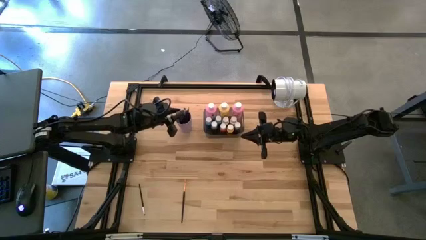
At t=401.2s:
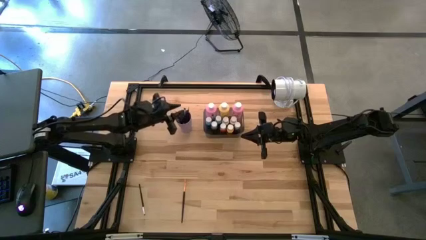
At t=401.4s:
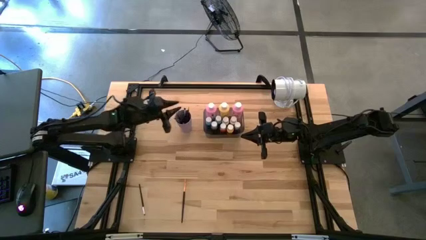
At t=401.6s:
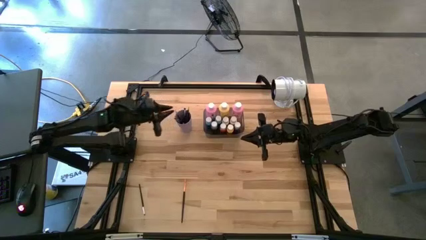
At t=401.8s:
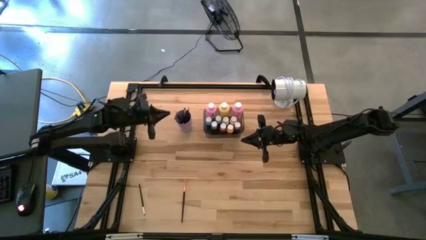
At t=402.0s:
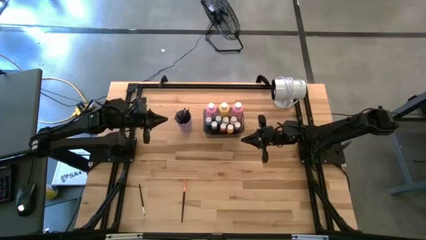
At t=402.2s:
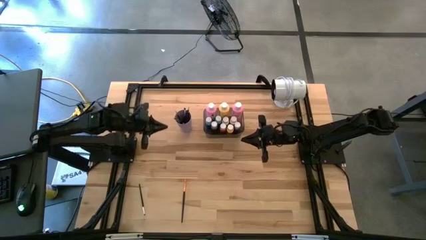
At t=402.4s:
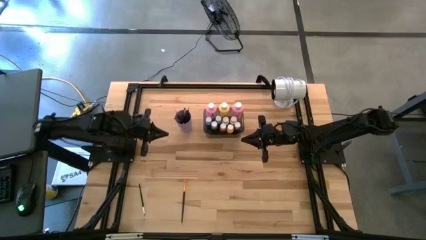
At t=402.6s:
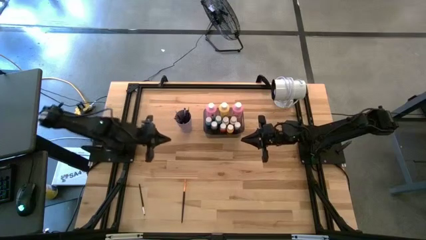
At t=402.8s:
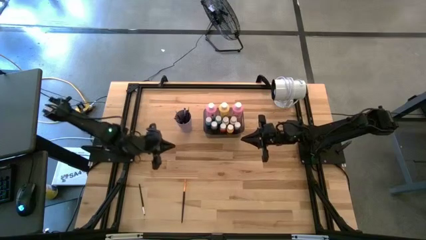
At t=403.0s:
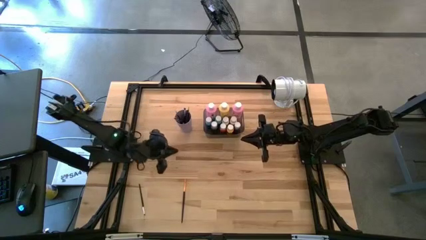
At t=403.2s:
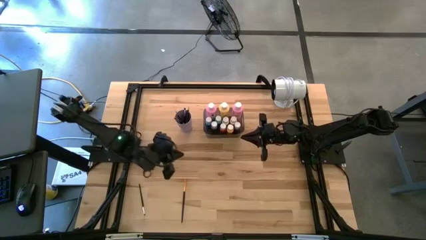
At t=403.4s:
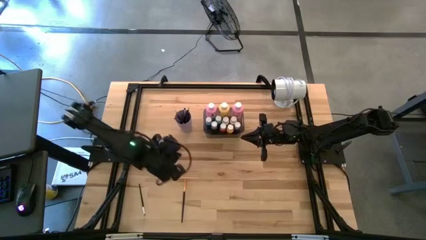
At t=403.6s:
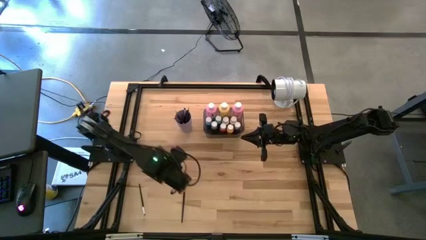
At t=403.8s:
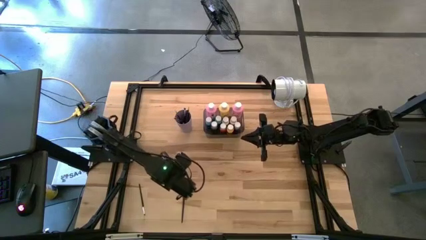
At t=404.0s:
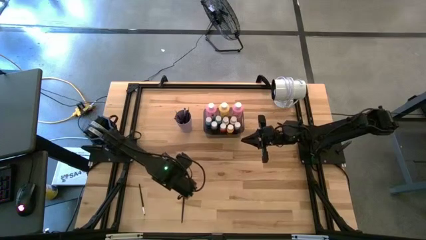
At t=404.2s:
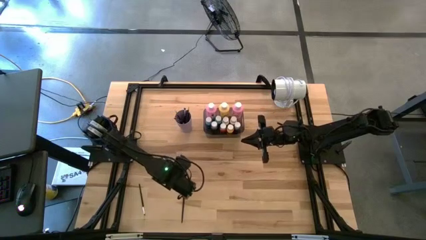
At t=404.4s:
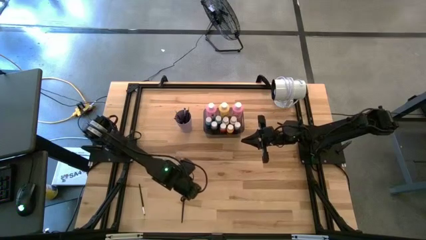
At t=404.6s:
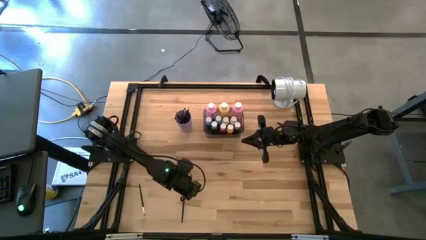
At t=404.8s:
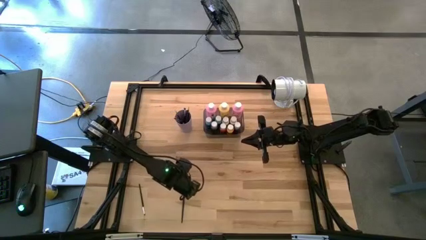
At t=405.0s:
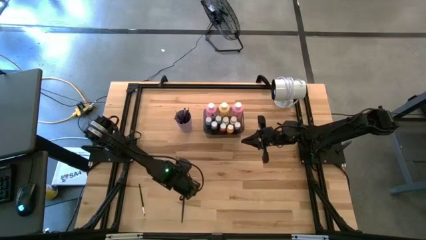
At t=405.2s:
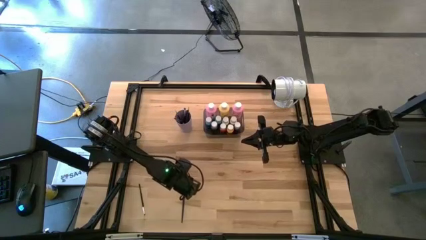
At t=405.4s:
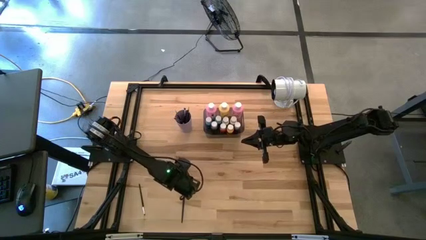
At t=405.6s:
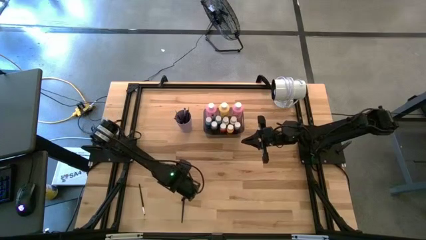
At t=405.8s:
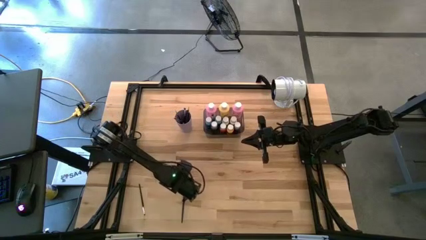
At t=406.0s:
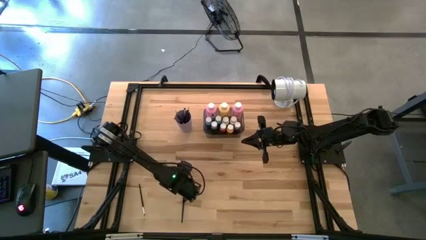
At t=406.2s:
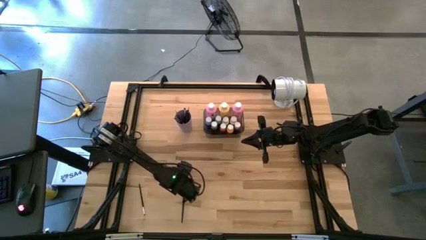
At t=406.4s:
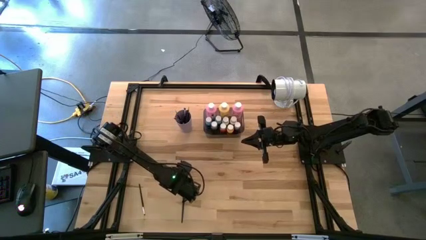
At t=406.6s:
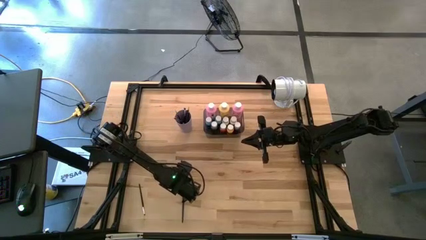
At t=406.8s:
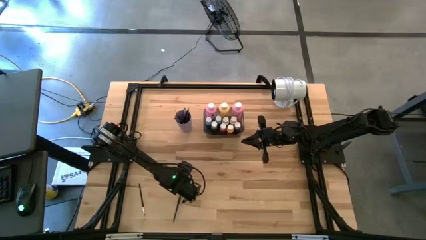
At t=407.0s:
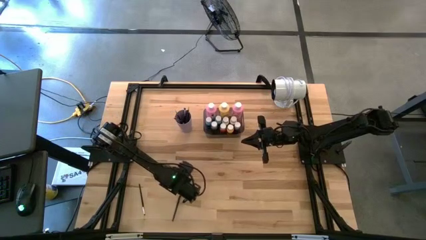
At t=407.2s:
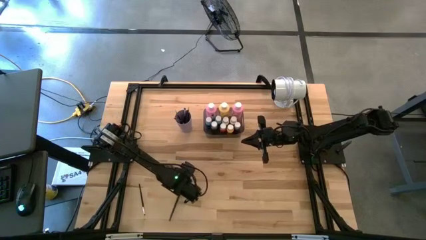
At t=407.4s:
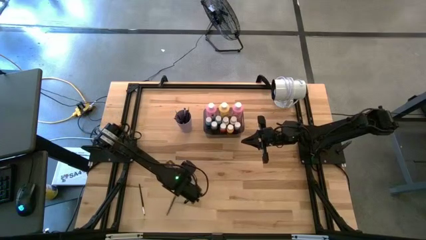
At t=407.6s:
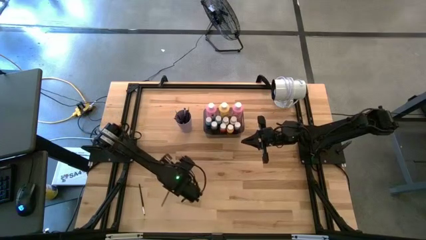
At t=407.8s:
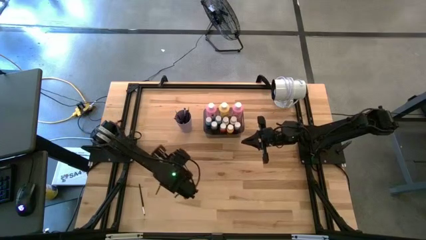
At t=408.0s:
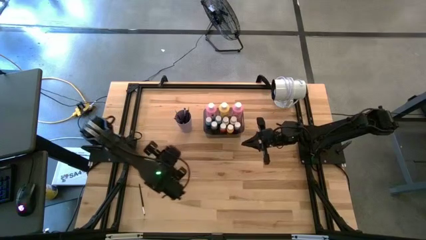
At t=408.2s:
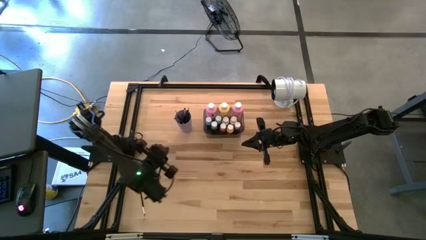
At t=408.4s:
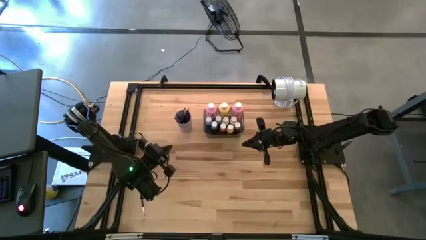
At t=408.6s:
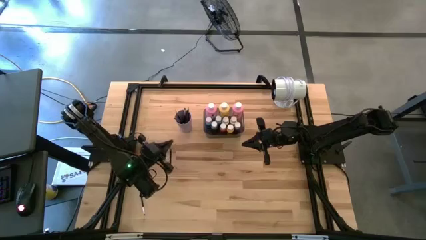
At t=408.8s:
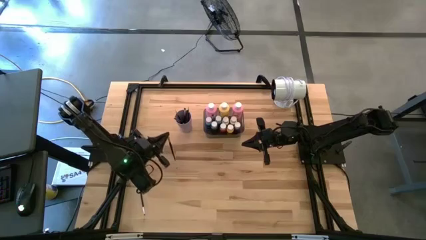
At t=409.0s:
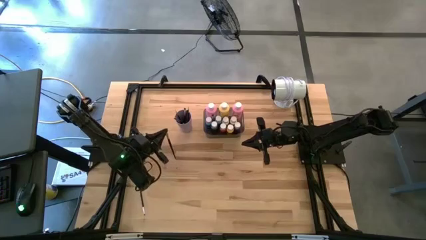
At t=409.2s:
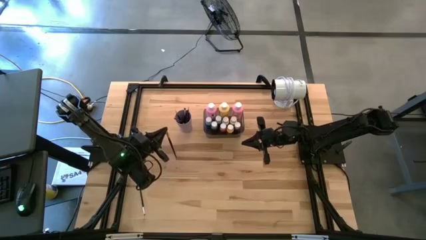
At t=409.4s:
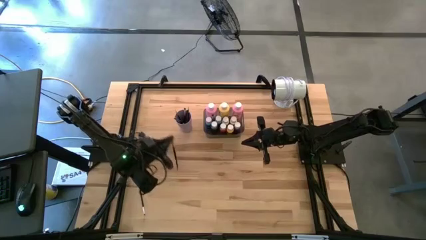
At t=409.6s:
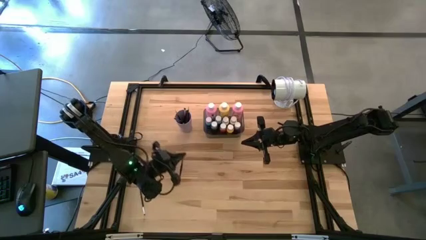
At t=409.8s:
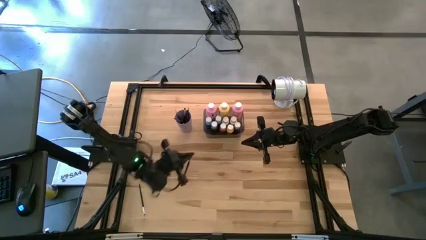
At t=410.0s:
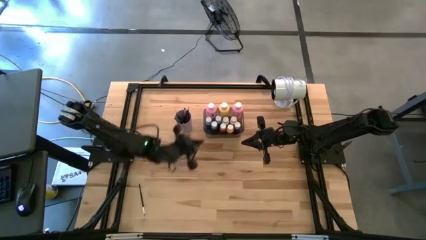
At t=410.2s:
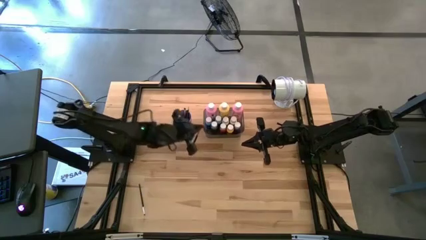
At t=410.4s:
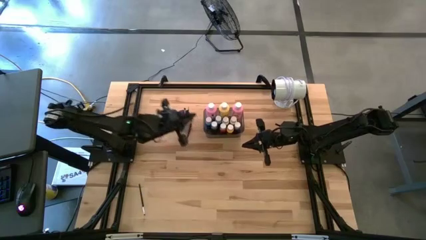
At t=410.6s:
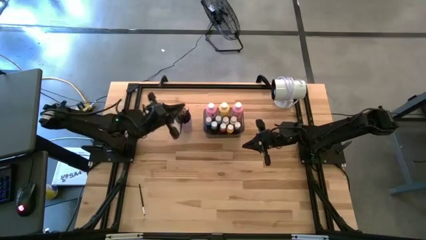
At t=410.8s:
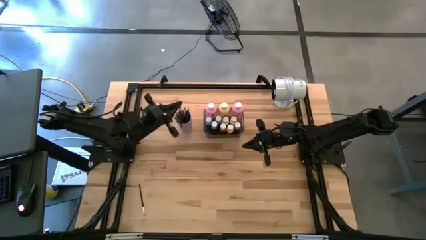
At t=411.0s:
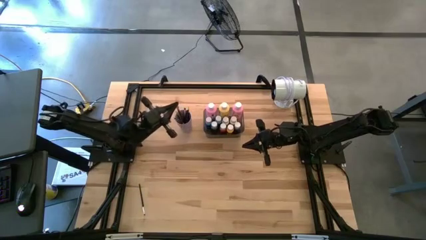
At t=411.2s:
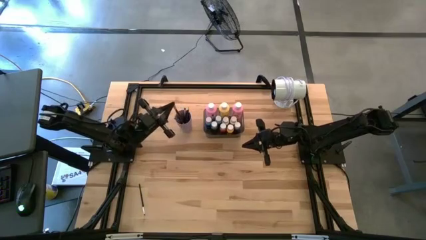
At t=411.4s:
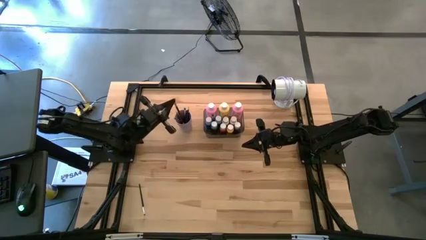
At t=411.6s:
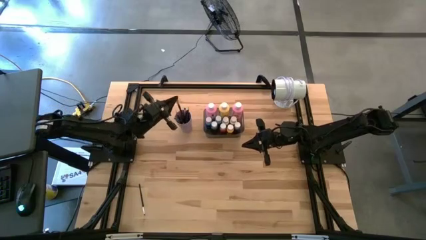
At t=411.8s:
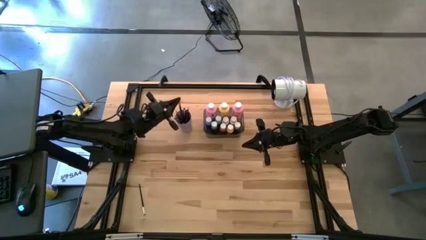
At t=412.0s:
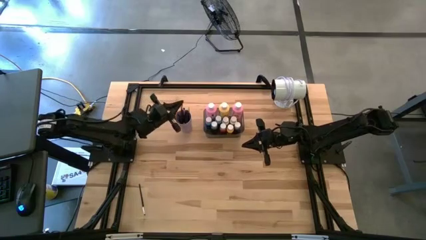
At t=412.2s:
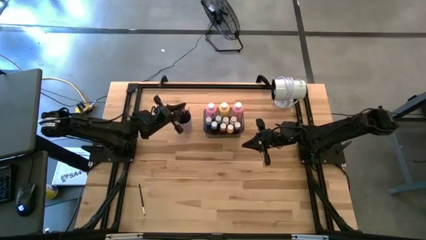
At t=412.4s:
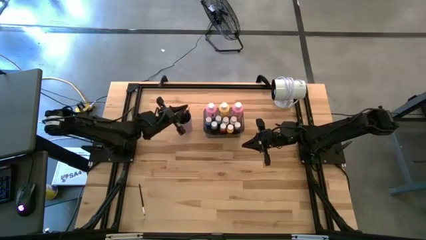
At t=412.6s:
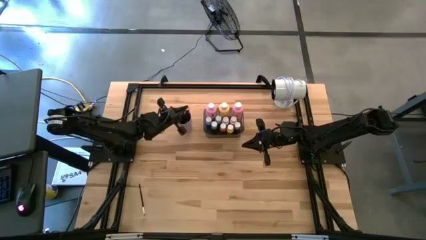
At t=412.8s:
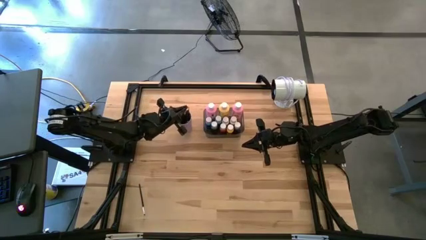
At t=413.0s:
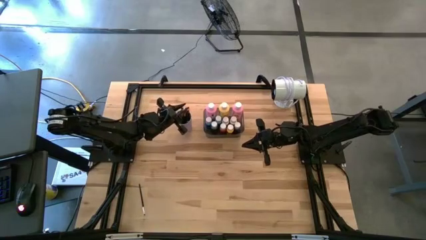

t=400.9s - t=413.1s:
Task: Pick & Place Paint Supplies
Put the gold paint brush into the purple cup

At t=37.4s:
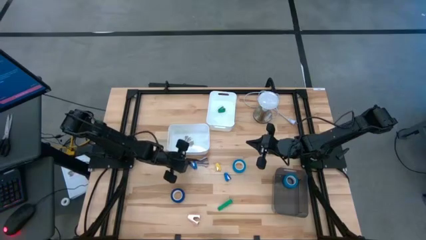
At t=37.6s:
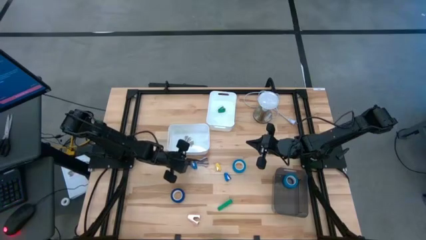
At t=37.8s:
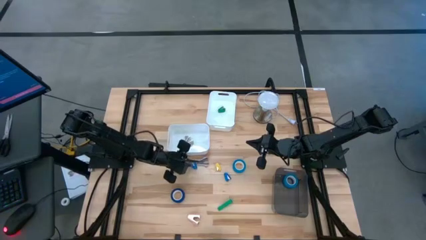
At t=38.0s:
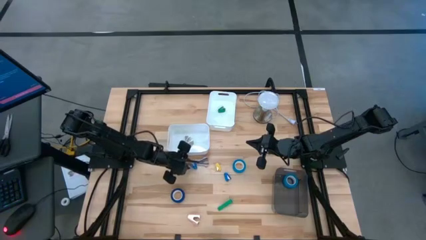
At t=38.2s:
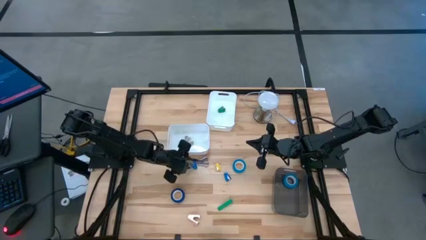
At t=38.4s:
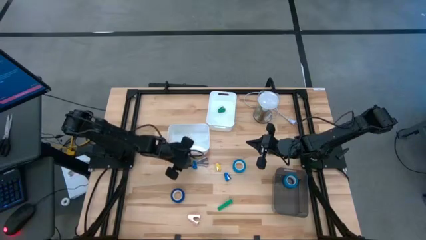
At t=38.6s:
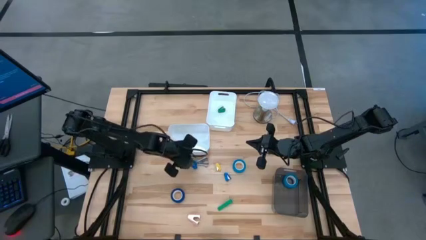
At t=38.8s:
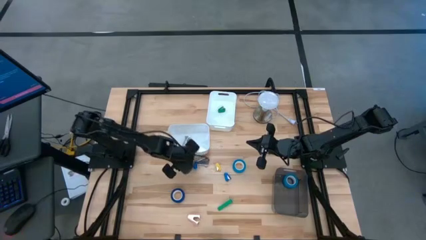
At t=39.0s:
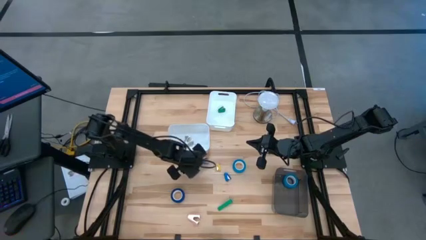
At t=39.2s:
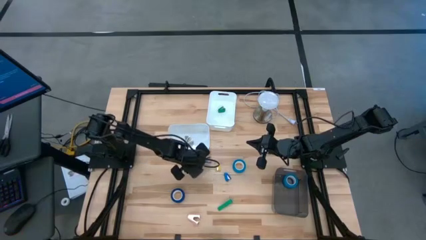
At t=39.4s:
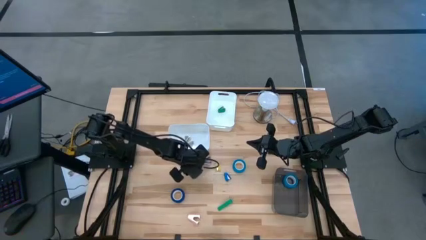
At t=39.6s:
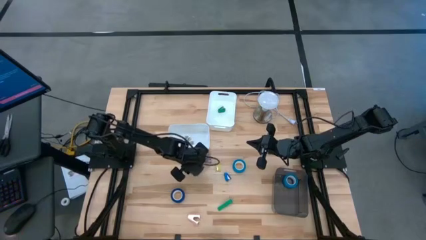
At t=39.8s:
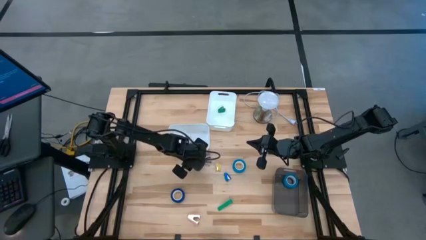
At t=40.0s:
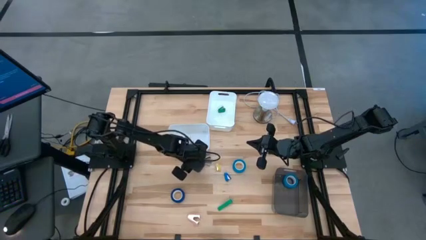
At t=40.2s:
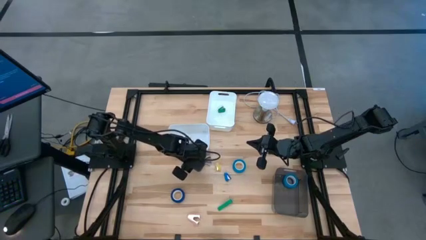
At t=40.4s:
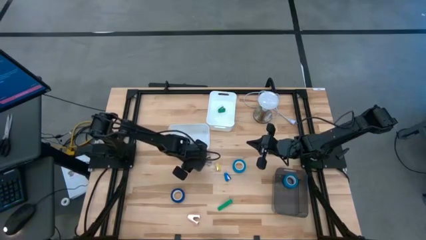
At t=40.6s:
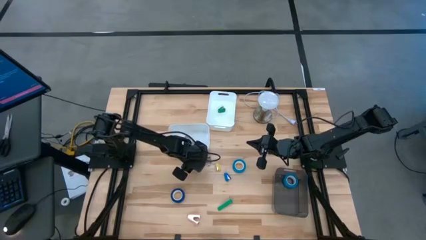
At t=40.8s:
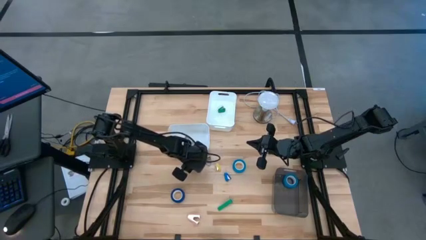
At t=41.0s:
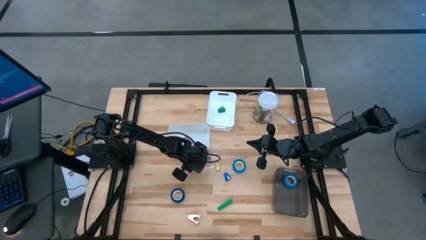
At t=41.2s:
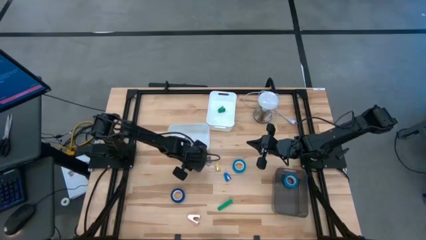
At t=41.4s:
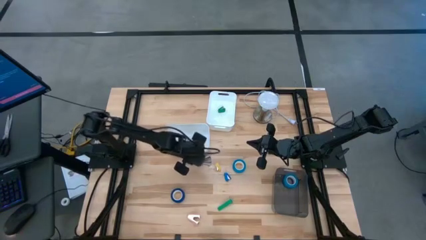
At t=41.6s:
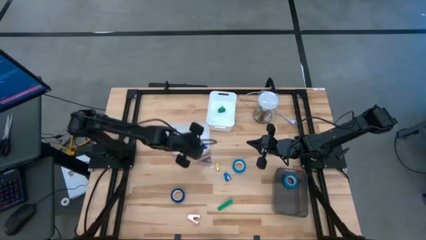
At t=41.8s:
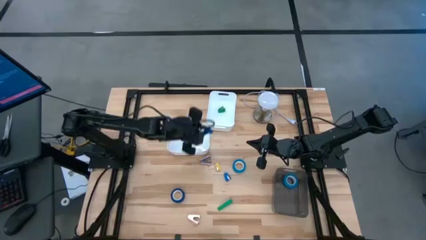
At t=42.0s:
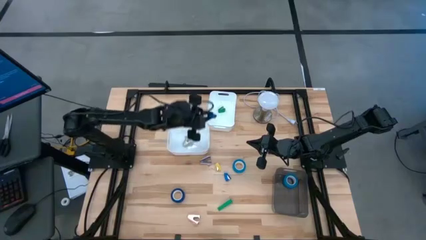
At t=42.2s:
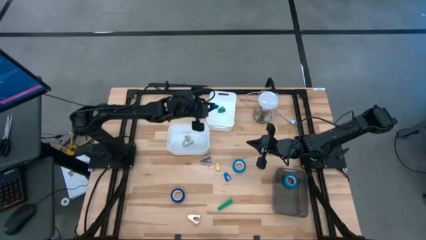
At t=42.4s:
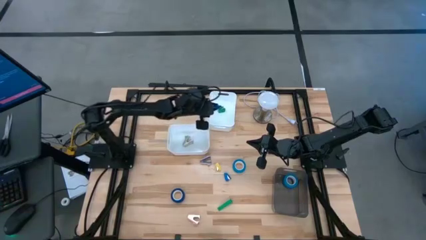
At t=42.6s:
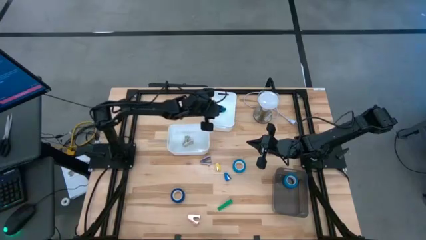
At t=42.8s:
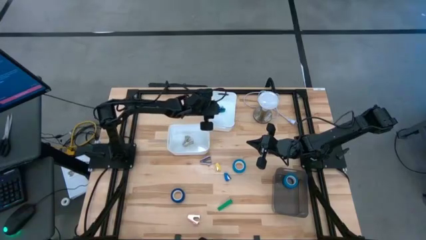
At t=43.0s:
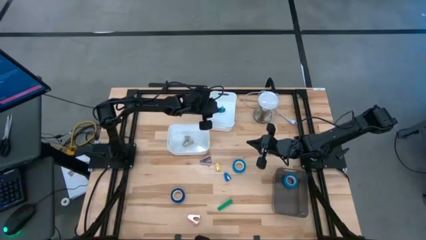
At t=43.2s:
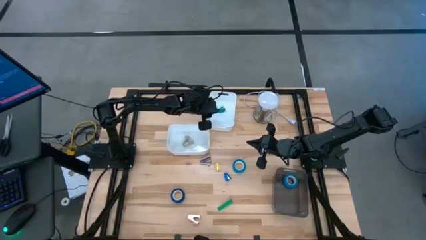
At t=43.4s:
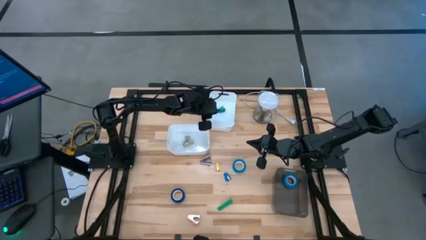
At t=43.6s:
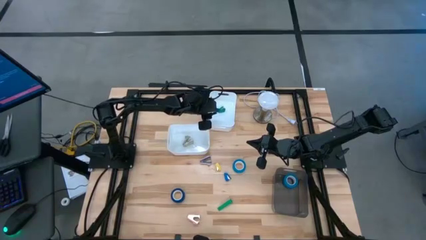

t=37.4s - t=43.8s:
Task: Pick and place Stapler, Stapler remover, tape
Put the left blue stapler into the top white bin
